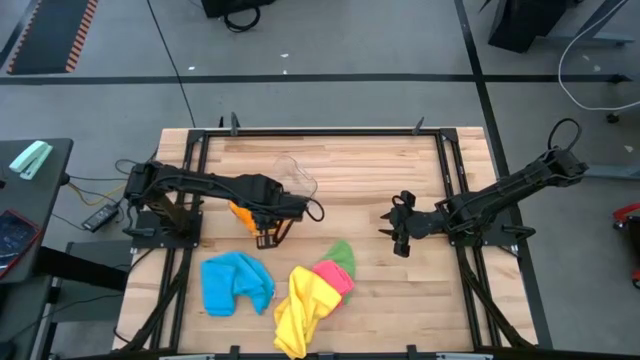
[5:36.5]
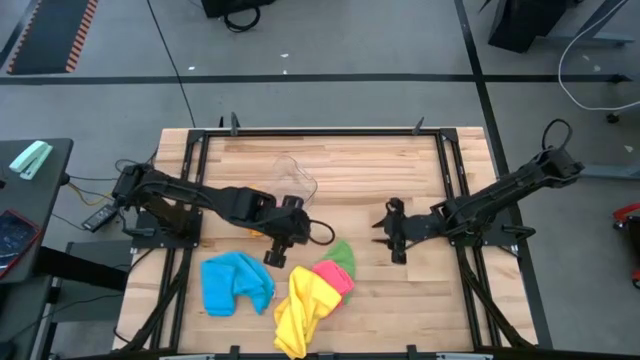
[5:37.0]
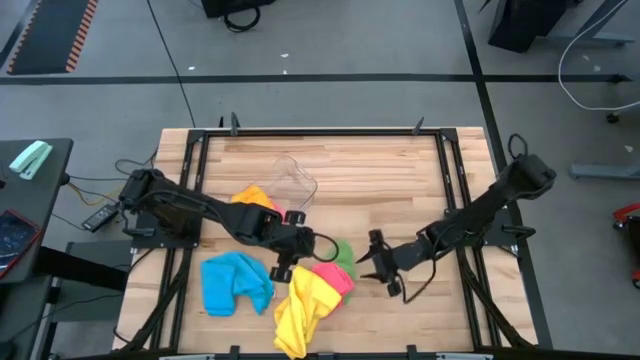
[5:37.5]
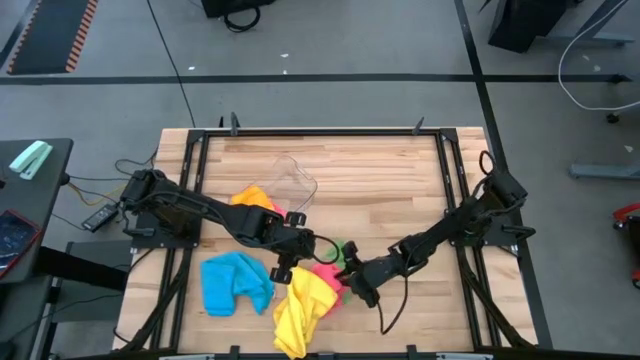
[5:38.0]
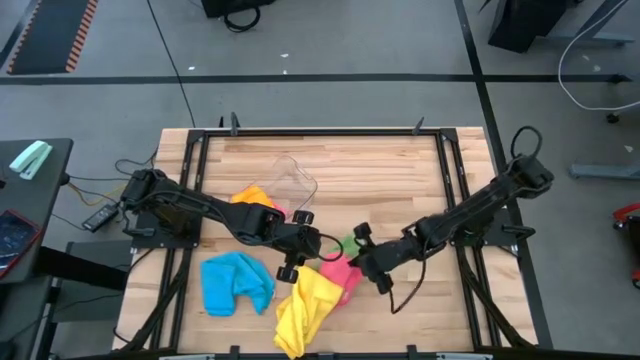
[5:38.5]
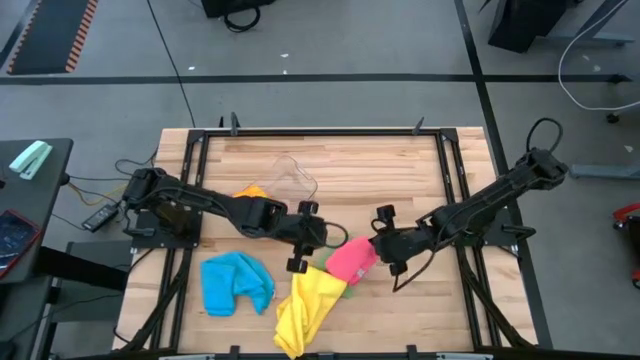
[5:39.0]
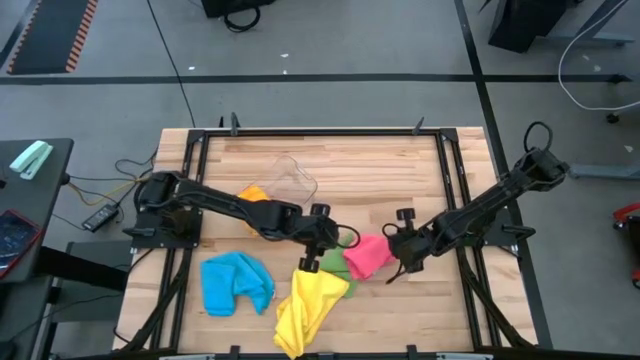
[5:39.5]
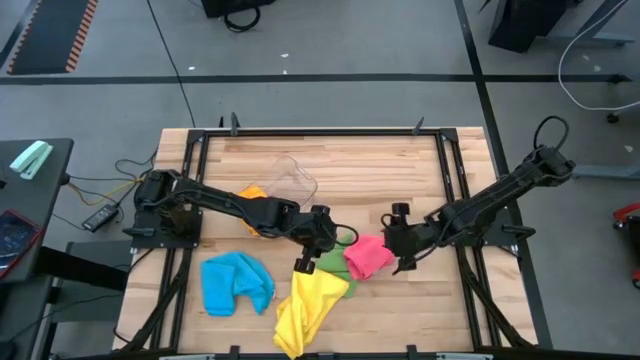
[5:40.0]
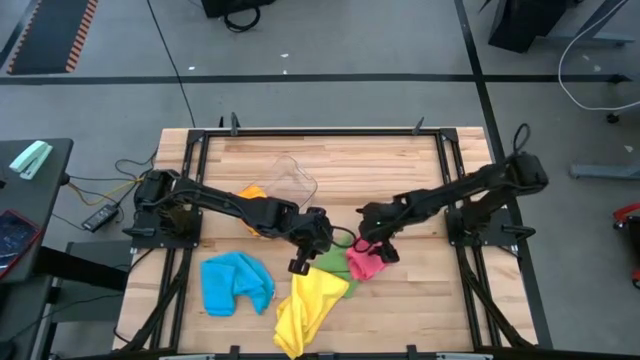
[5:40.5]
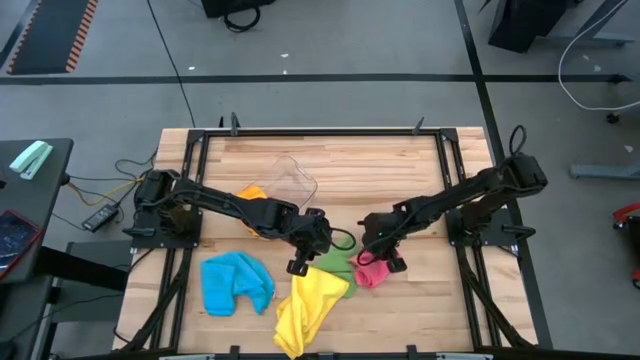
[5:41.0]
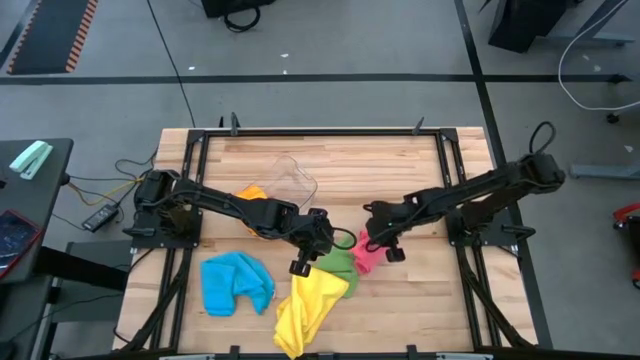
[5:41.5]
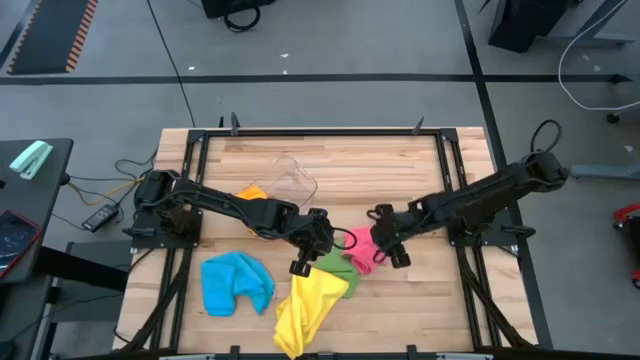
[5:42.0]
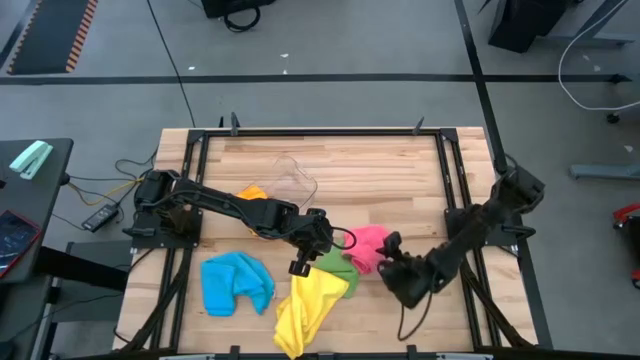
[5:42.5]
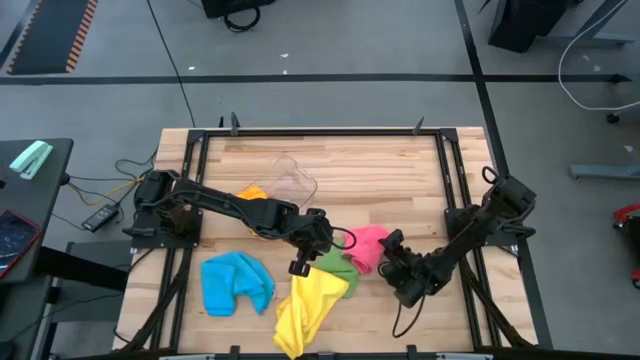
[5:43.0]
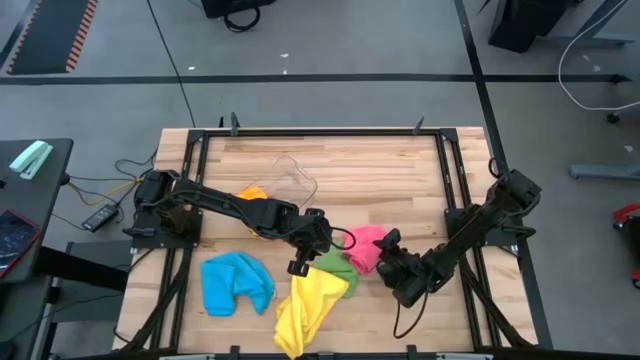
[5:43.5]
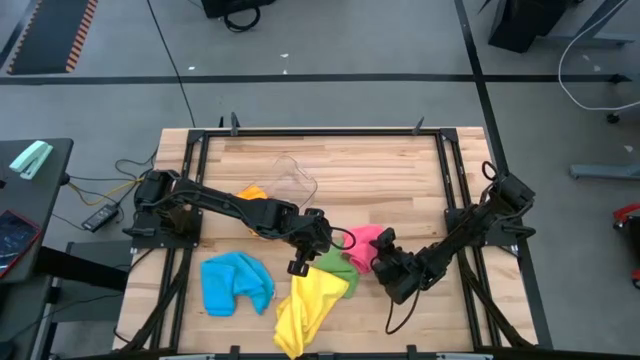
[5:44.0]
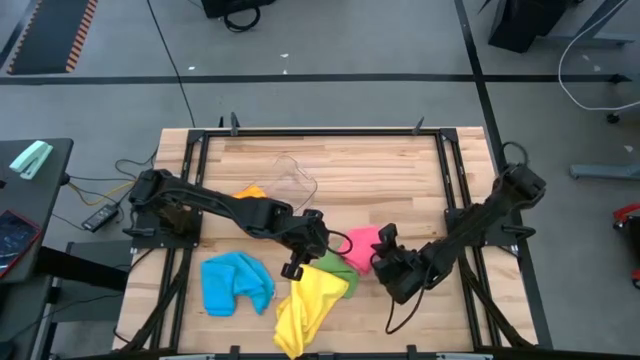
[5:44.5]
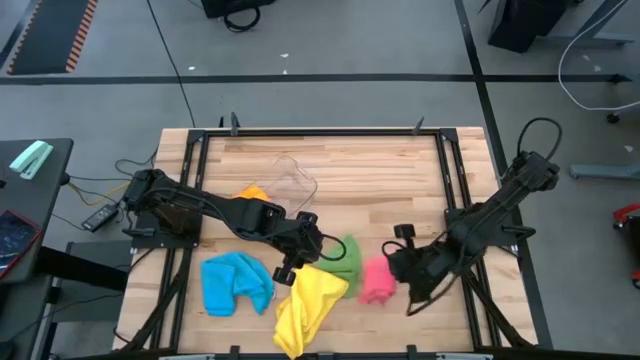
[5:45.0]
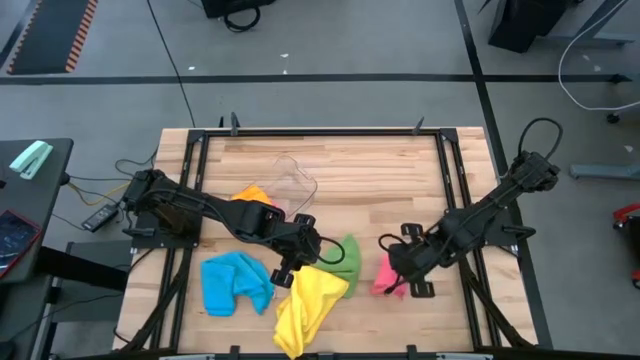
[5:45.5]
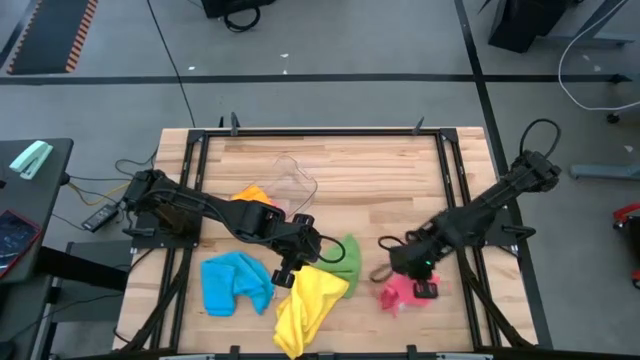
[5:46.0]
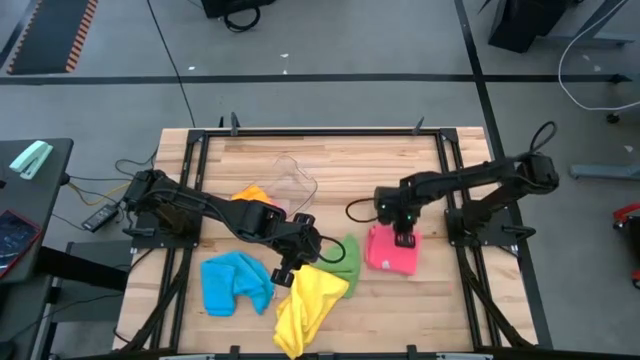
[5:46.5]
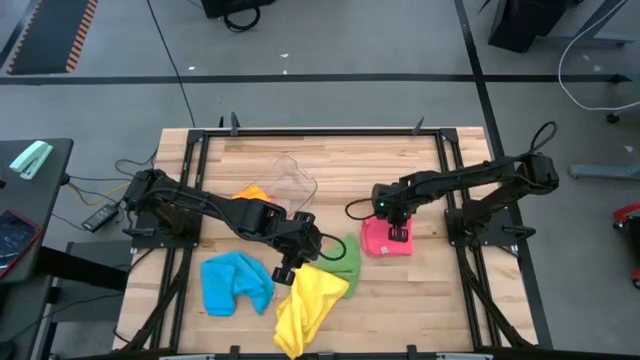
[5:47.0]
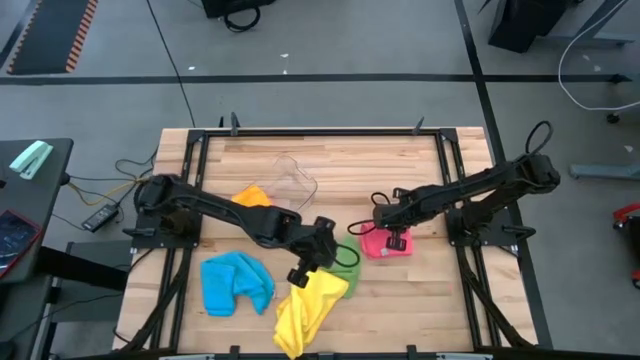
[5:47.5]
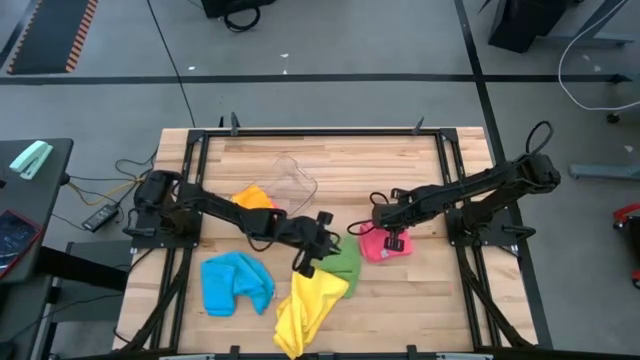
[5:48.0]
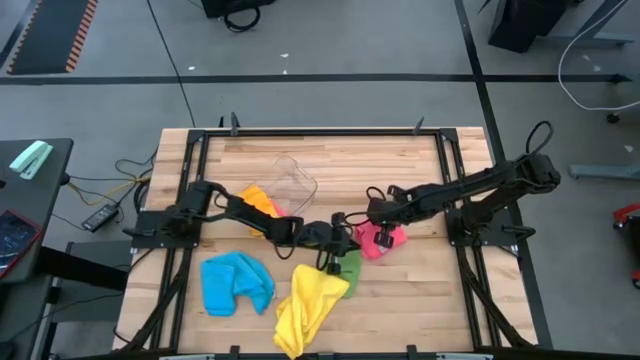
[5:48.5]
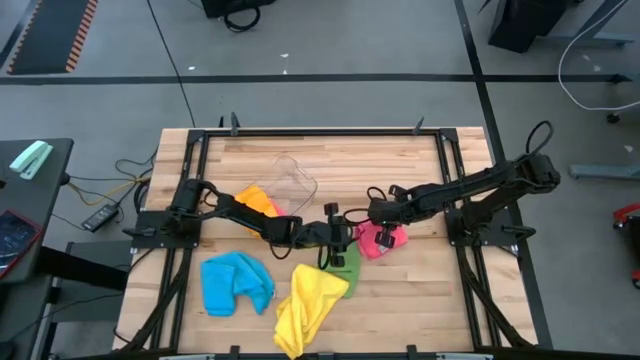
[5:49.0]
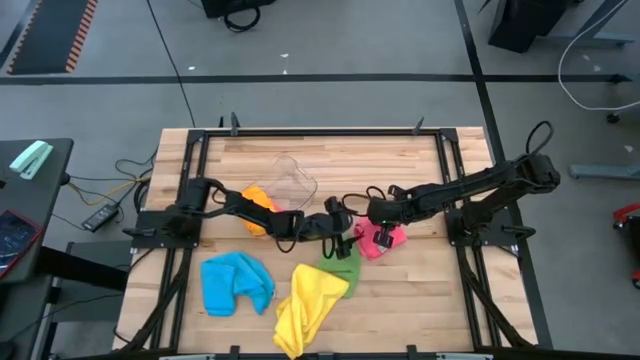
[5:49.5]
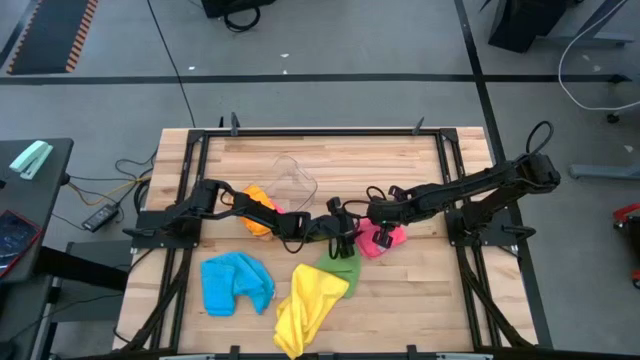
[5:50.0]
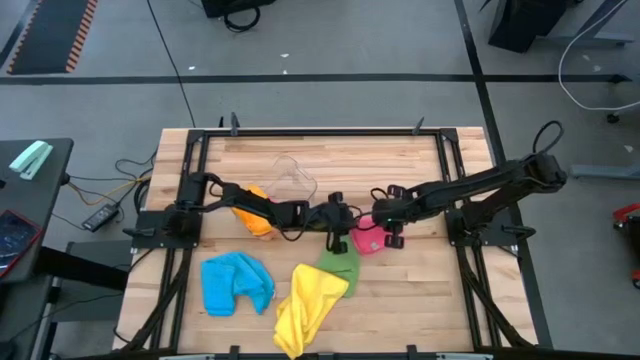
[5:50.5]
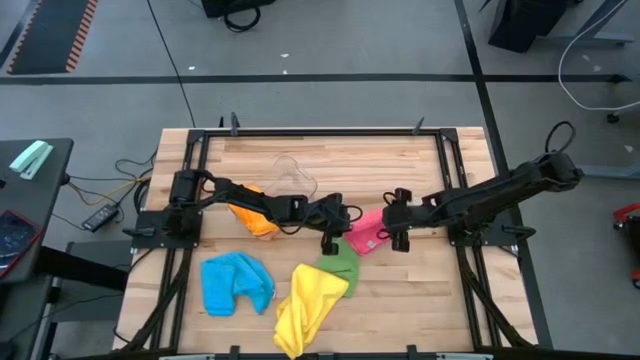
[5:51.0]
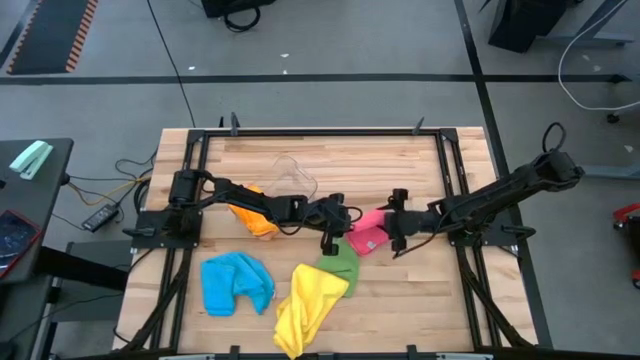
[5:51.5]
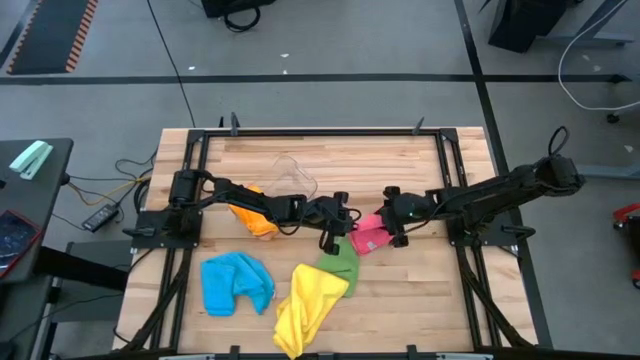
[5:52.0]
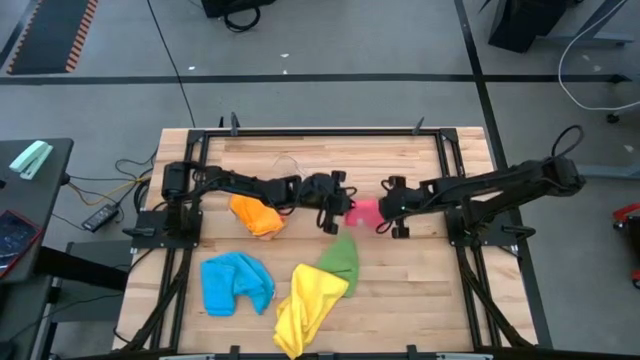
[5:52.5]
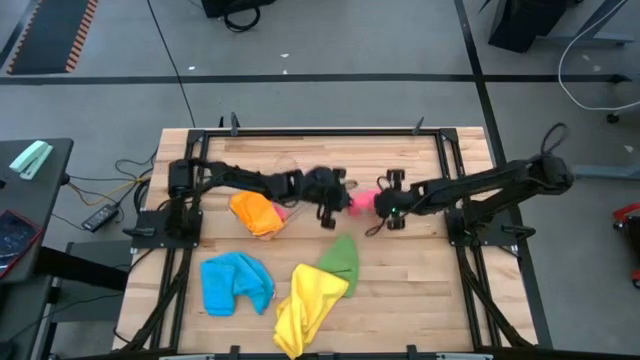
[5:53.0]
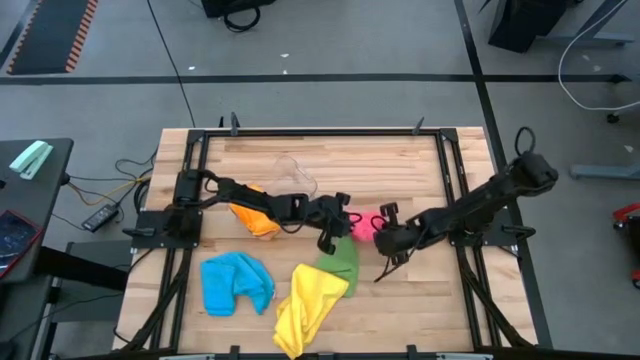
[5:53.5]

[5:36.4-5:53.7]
Task: Fold microfiber towels
Fold the pink microfiber towel
